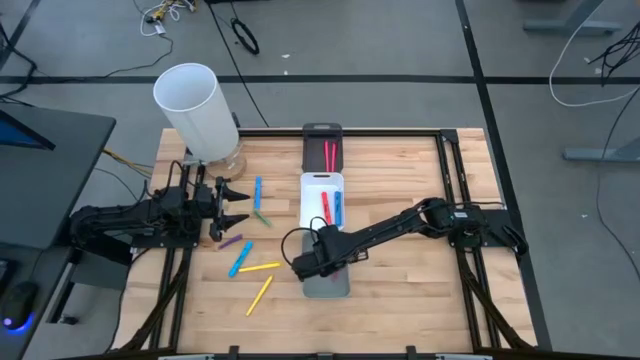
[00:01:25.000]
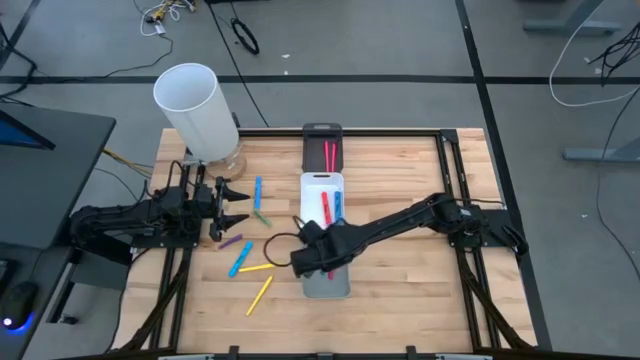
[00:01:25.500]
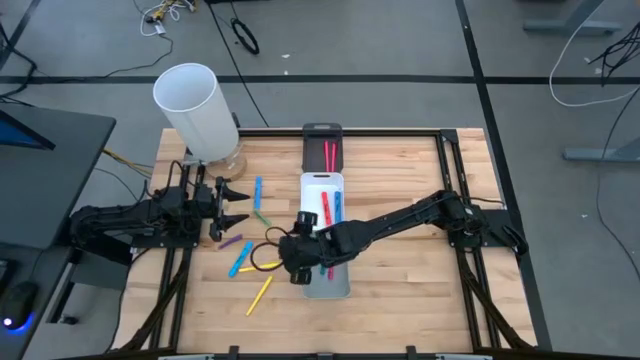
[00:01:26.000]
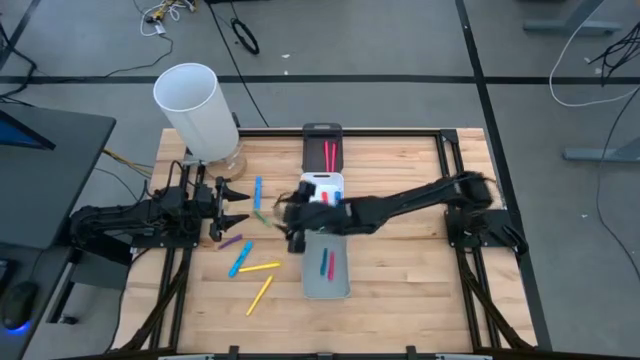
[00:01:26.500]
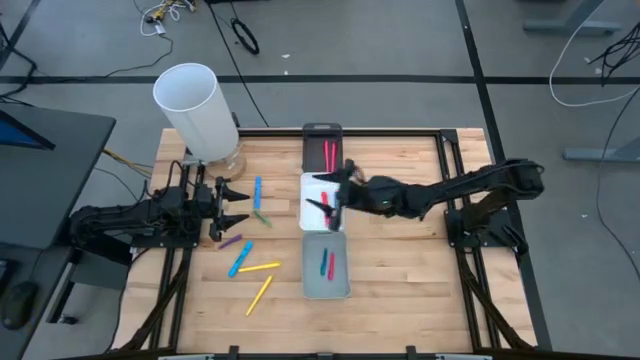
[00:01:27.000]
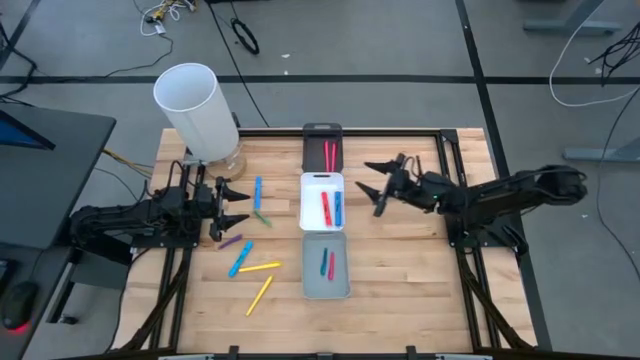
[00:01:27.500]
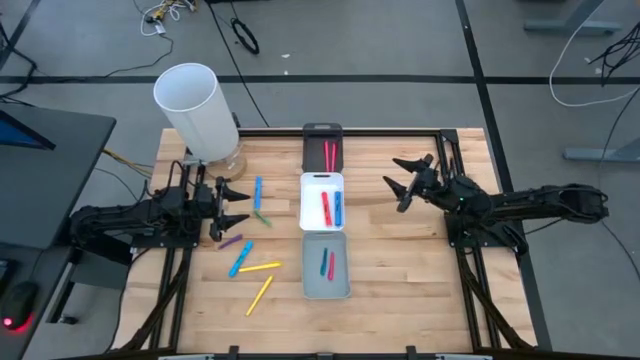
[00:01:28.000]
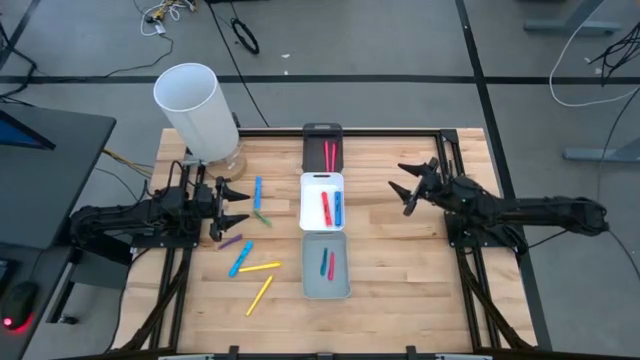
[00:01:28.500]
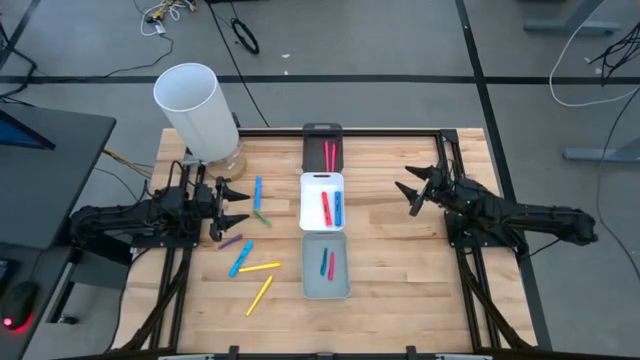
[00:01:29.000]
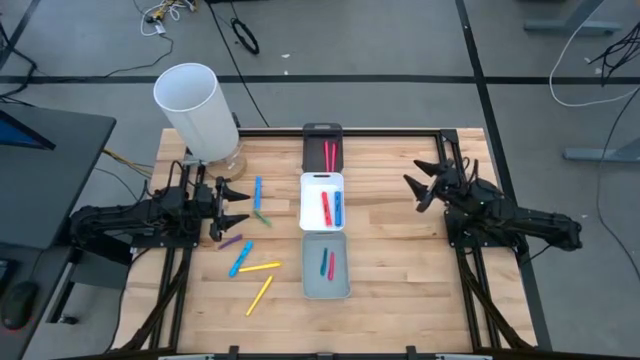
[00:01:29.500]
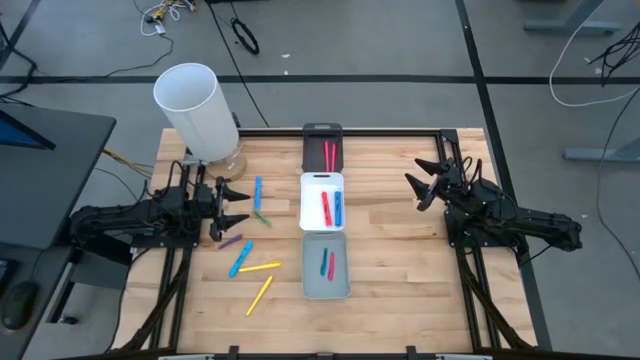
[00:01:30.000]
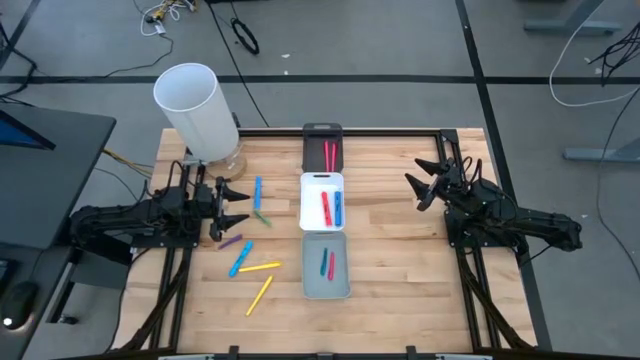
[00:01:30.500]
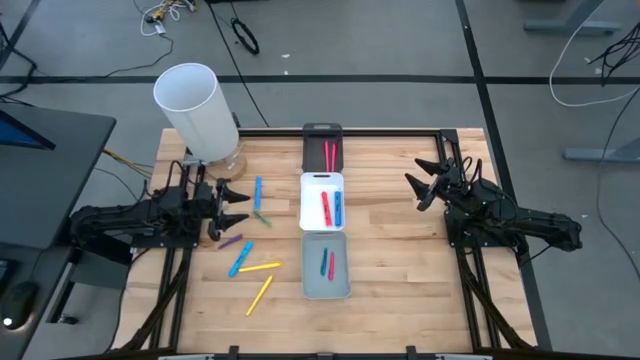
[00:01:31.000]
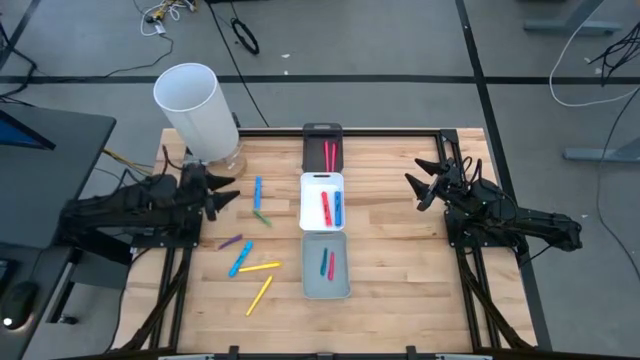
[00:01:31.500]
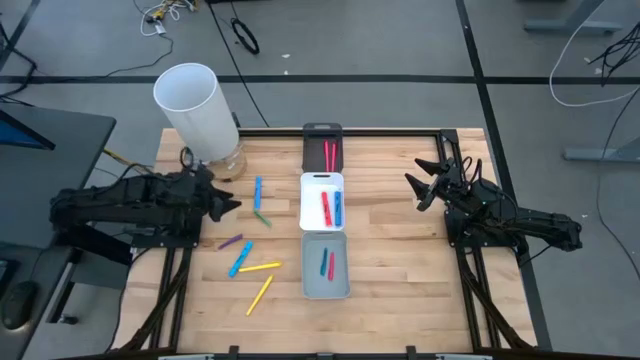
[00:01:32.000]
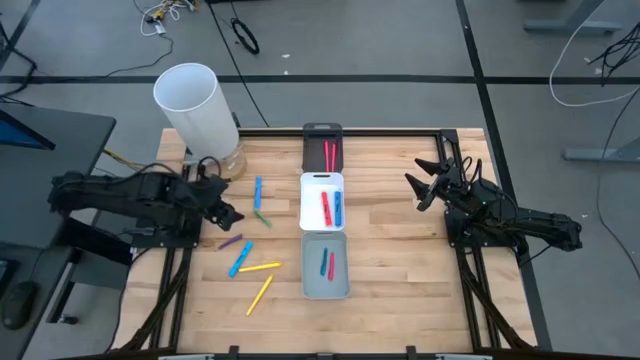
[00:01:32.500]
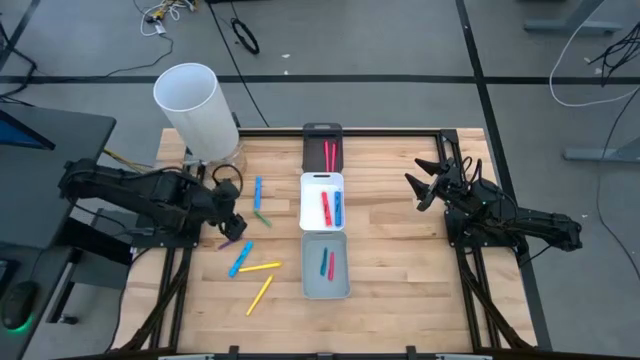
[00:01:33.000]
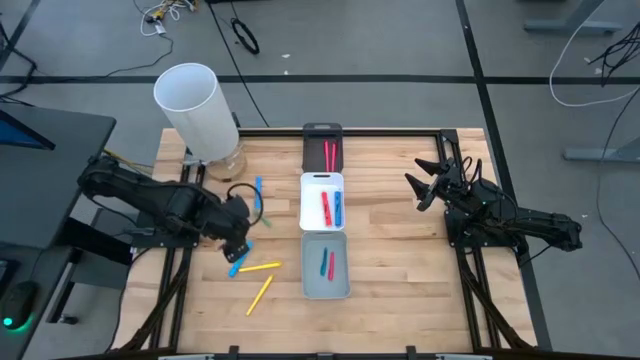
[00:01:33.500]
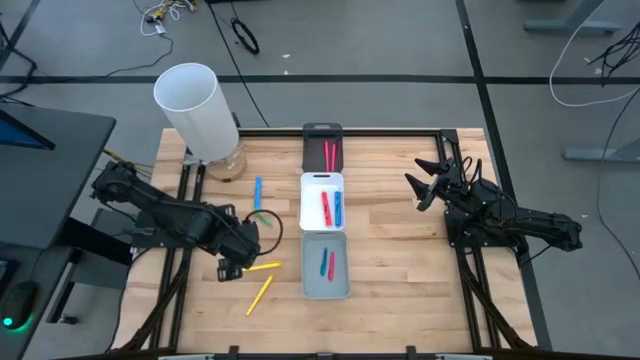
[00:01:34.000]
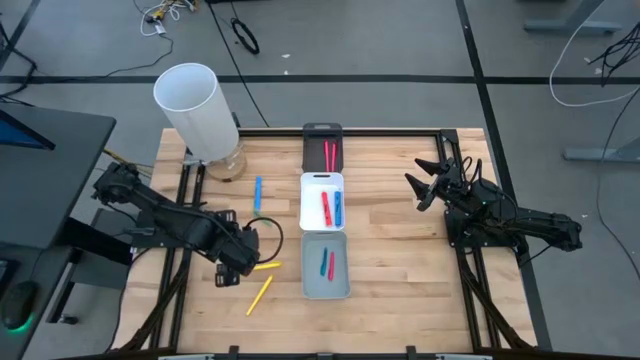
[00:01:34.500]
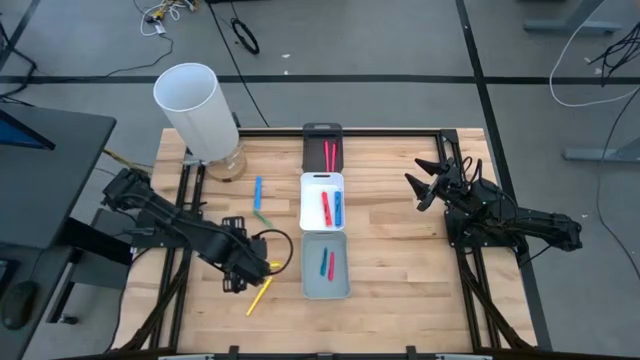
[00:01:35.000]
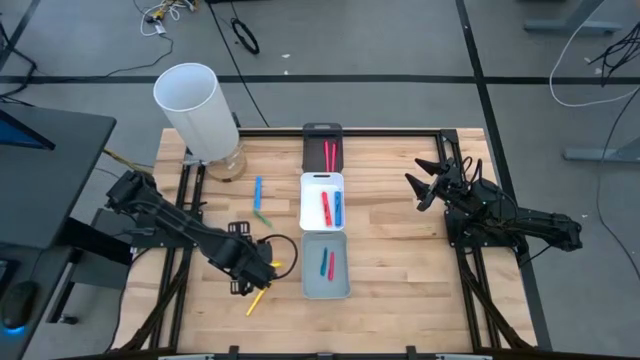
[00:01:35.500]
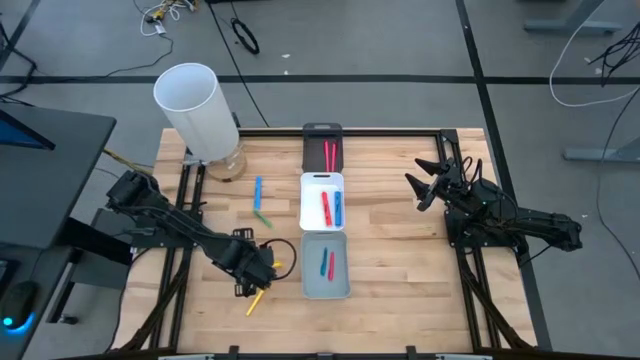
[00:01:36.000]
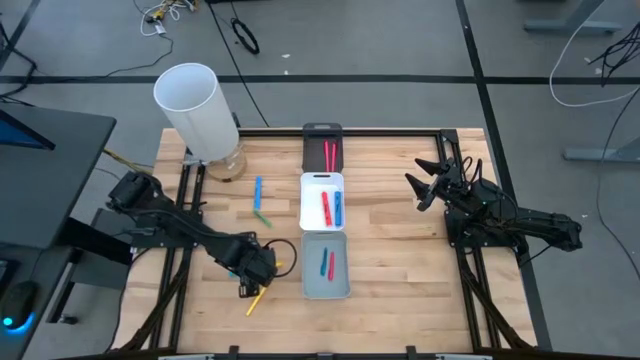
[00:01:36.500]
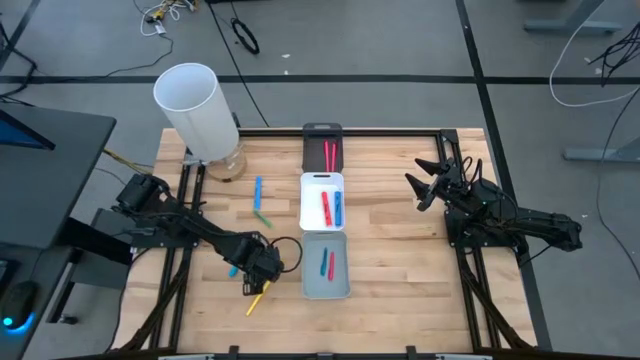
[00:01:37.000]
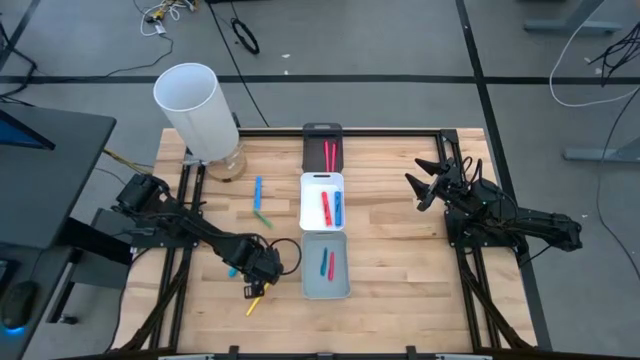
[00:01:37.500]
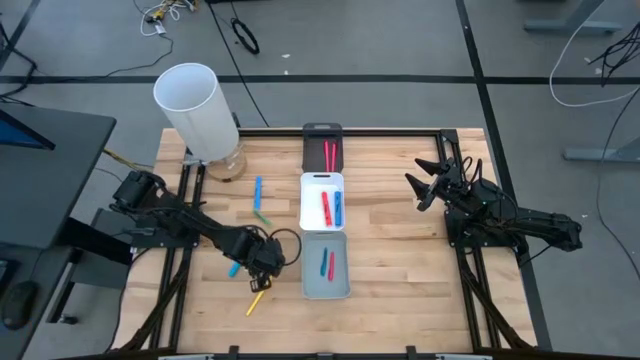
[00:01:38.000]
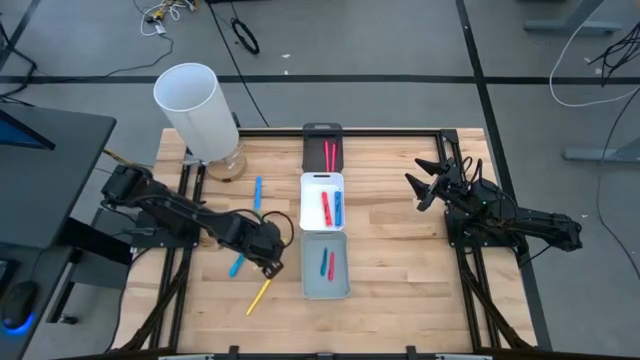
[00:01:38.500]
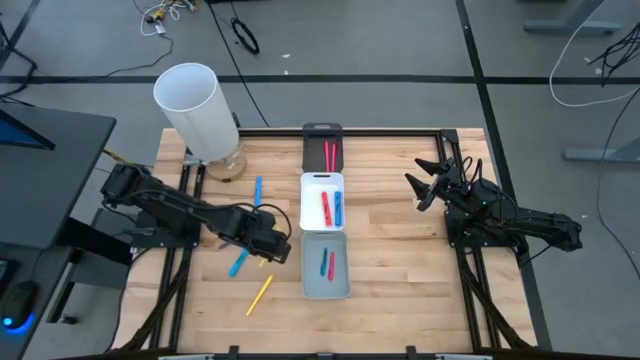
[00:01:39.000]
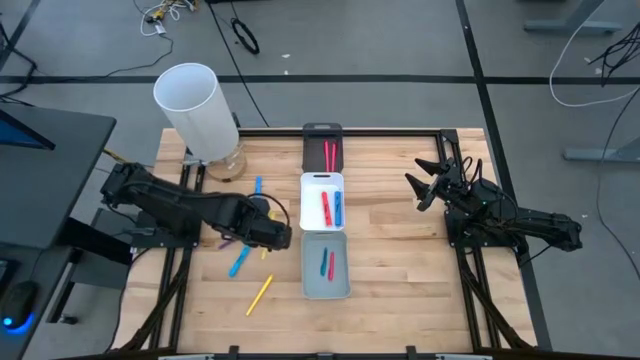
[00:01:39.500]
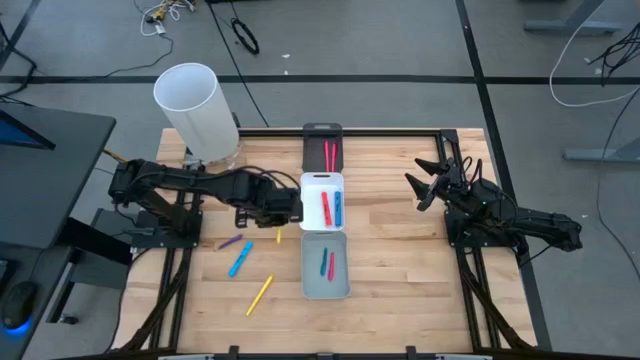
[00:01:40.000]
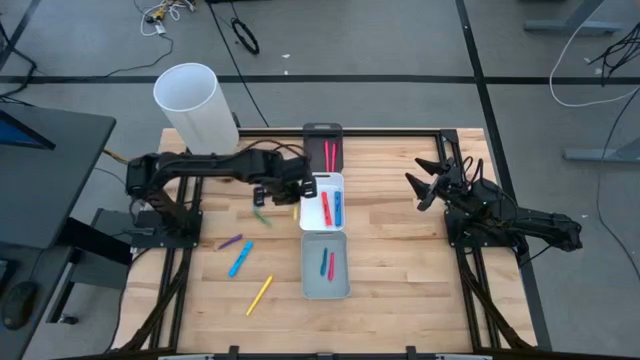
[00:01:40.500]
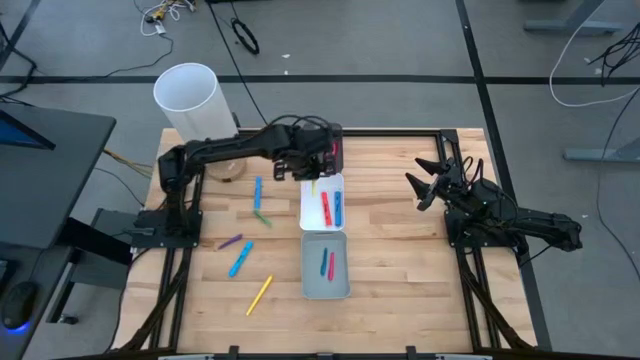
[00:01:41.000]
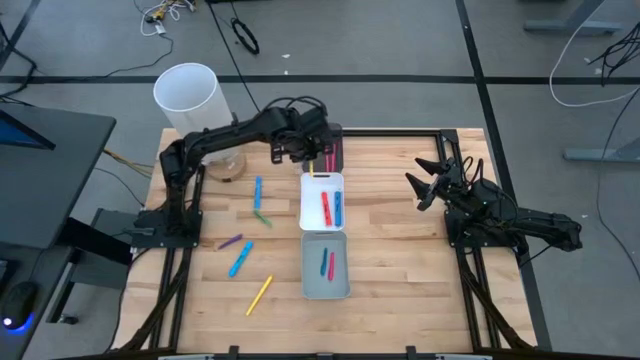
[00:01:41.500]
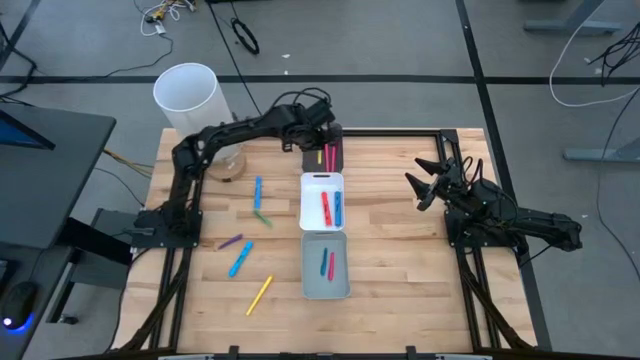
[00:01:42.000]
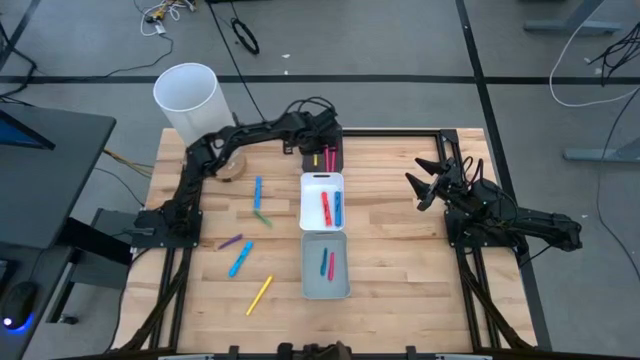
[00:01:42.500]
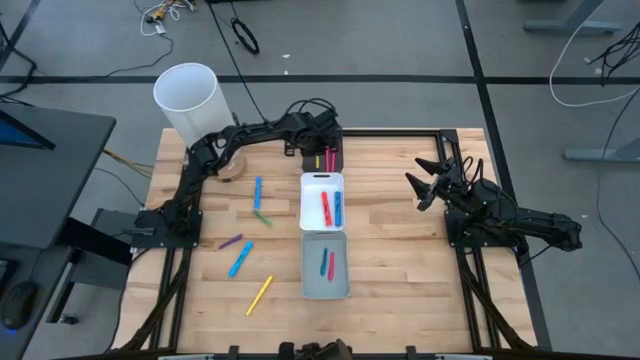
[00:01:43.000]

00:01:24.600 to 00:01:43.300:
Task: Pick & Place Markers
Put the yellow pen into the black bin

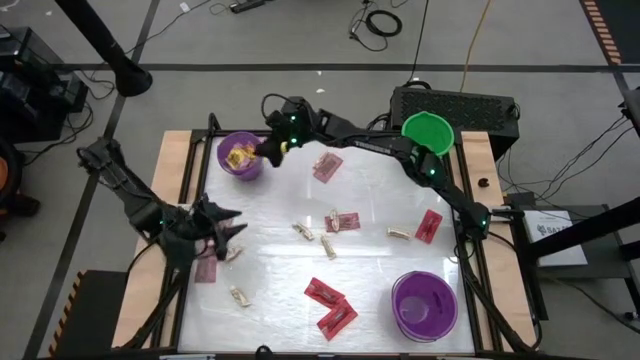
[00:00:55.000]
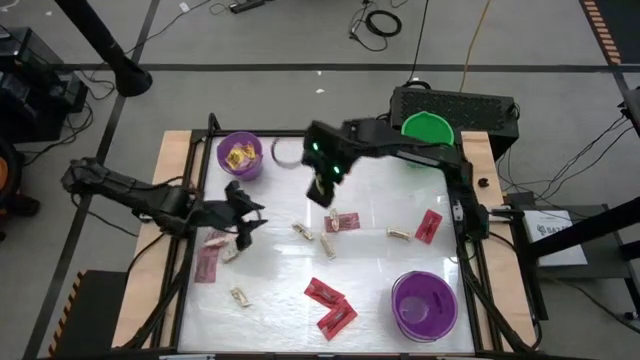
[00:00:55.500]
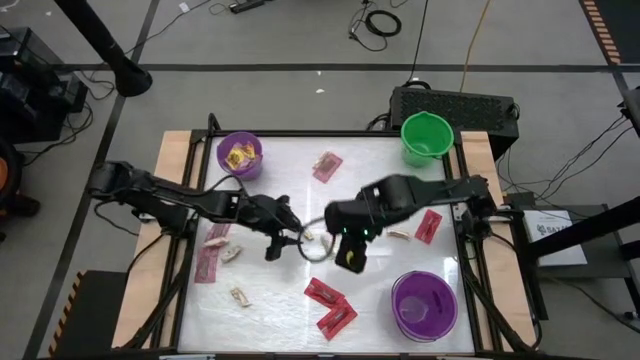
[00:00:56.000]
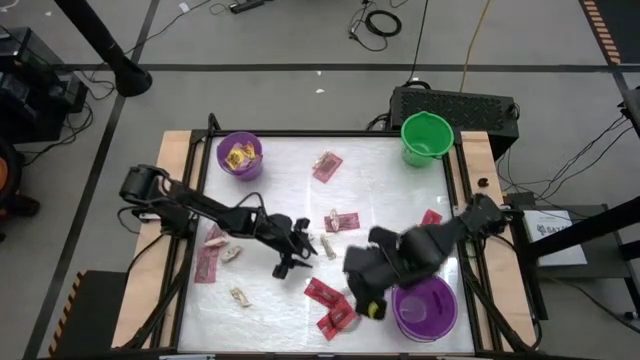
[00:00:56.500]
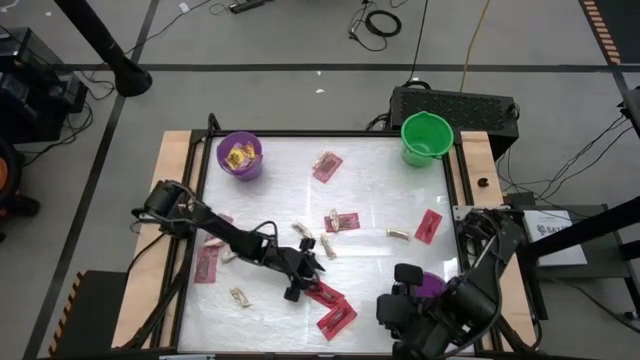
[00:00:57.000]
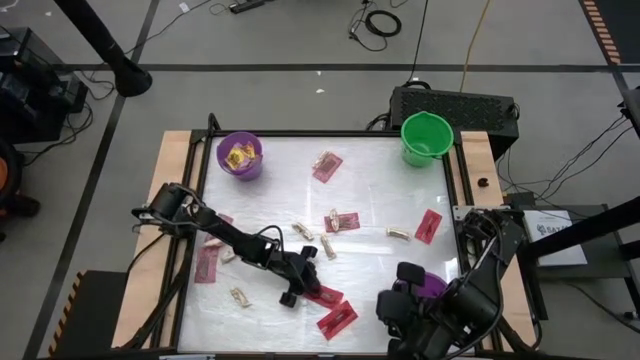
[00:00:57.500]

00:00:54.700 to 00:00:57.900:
Task: Sort candy by brand, put in halloween buckets
Put the red candy into the bottom violet bucket
